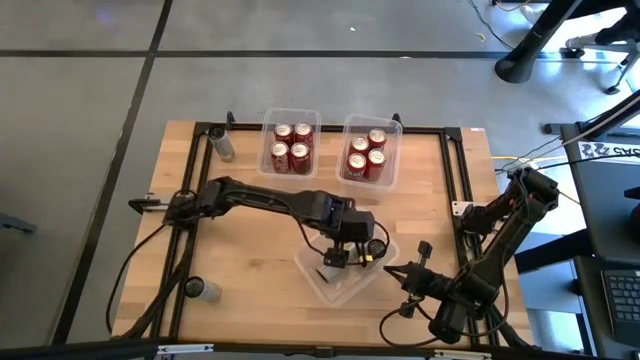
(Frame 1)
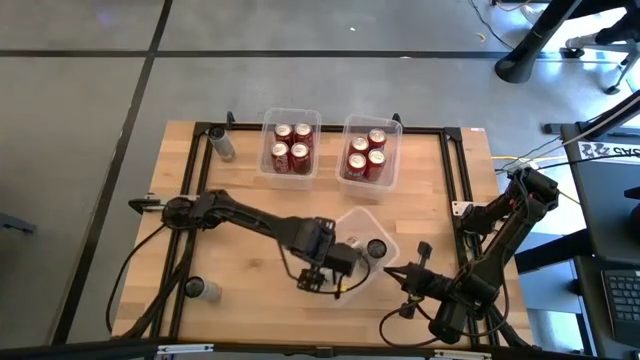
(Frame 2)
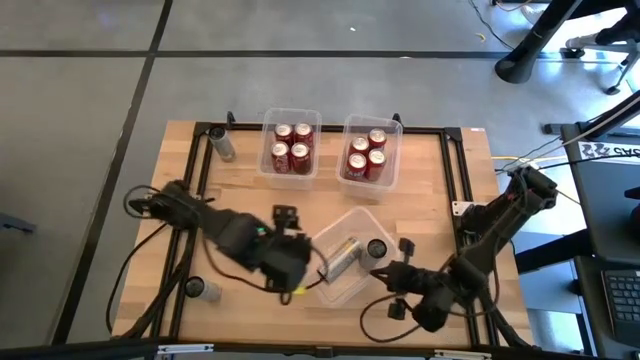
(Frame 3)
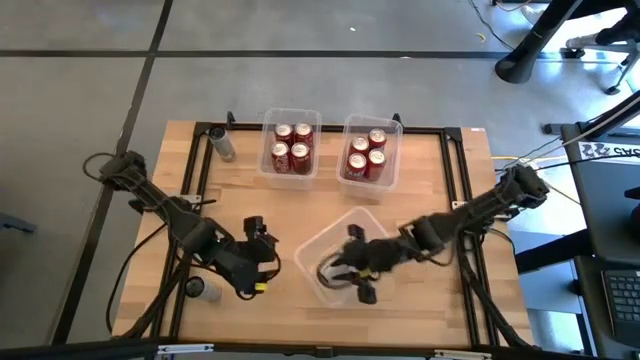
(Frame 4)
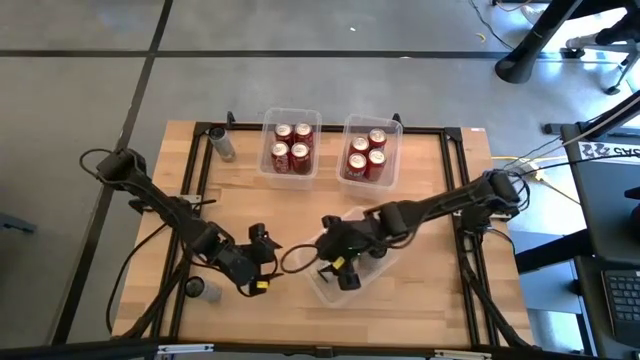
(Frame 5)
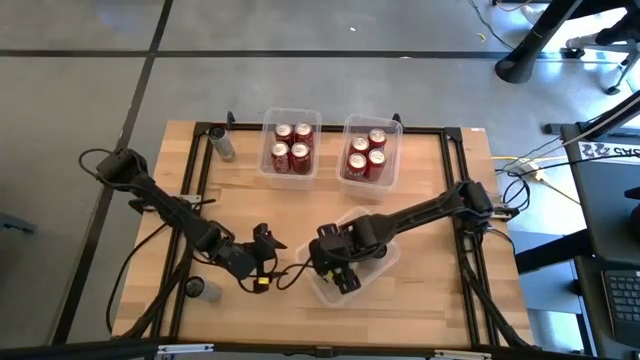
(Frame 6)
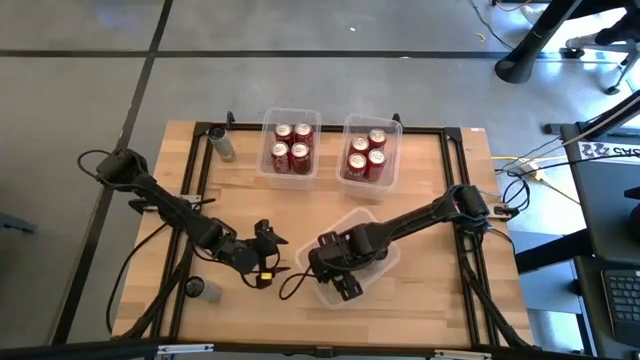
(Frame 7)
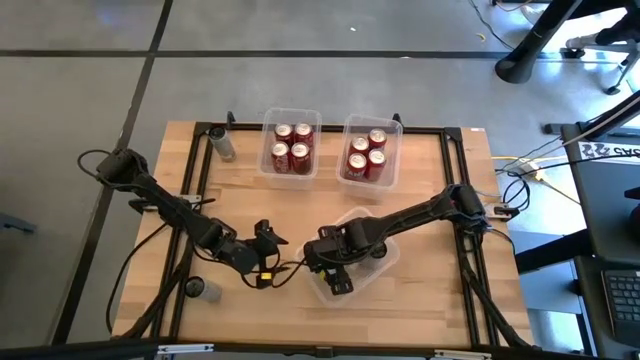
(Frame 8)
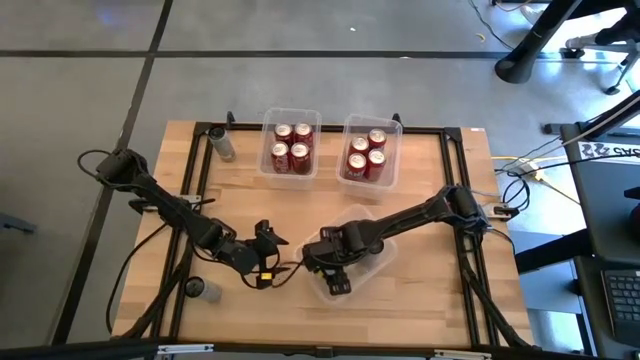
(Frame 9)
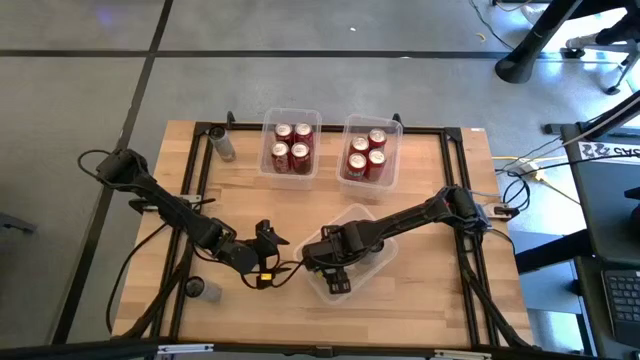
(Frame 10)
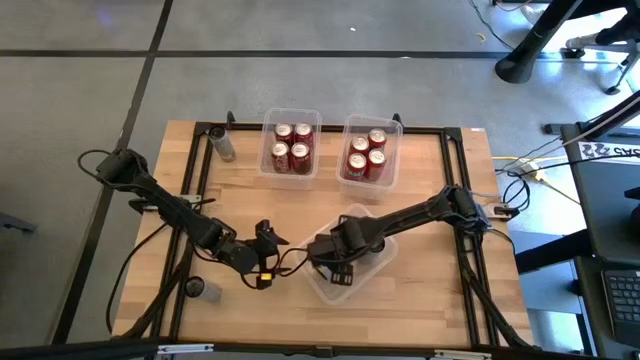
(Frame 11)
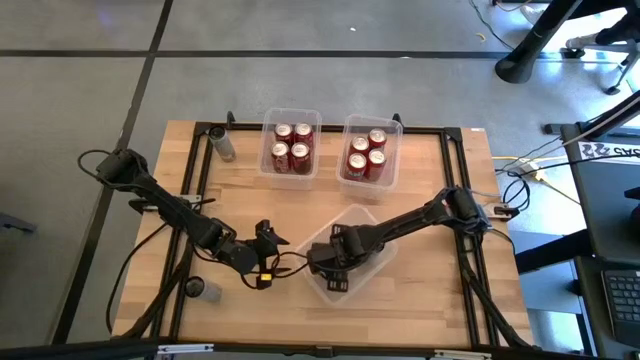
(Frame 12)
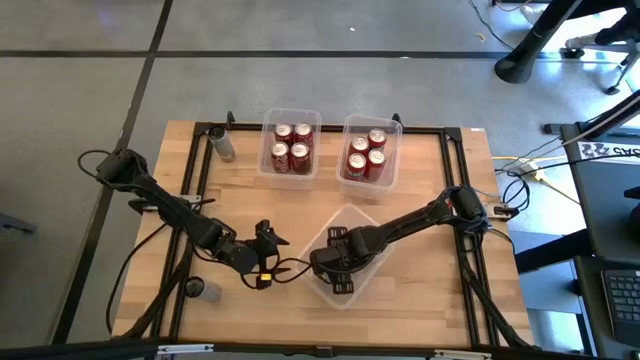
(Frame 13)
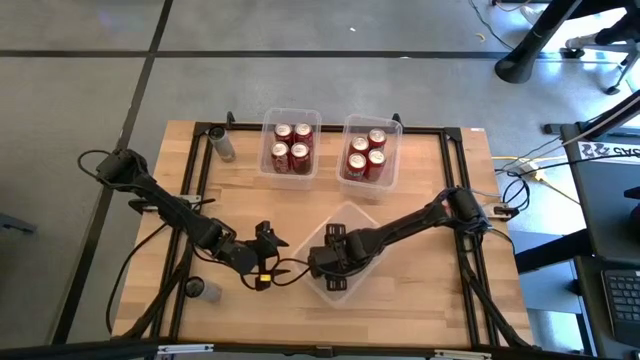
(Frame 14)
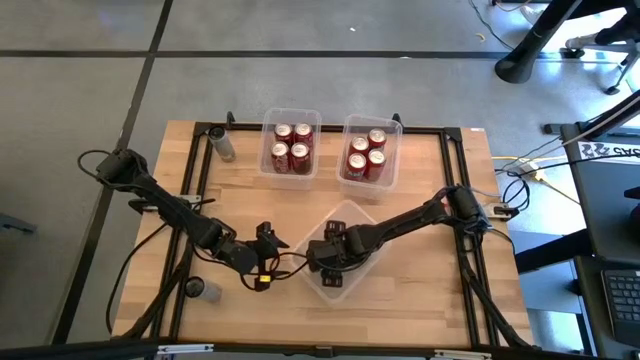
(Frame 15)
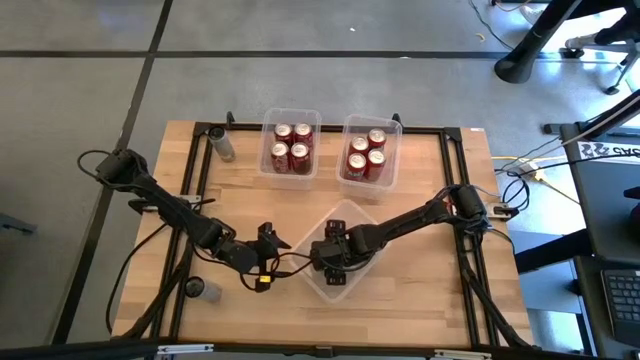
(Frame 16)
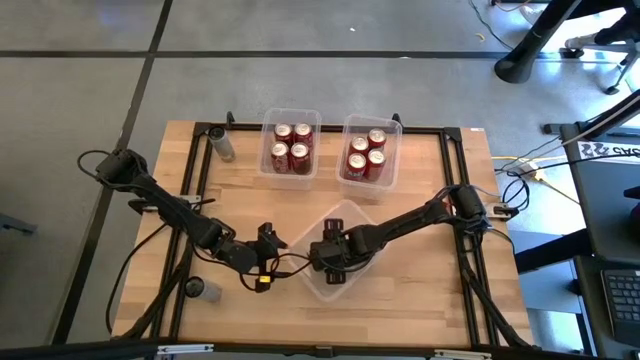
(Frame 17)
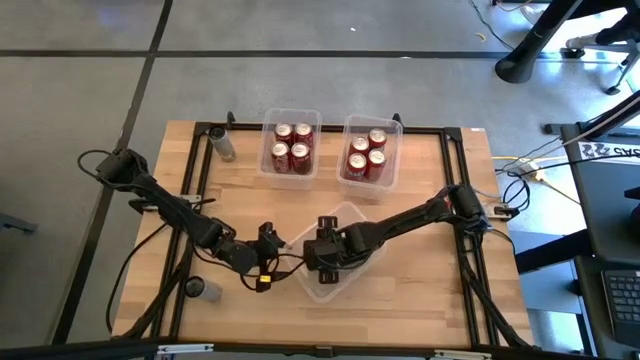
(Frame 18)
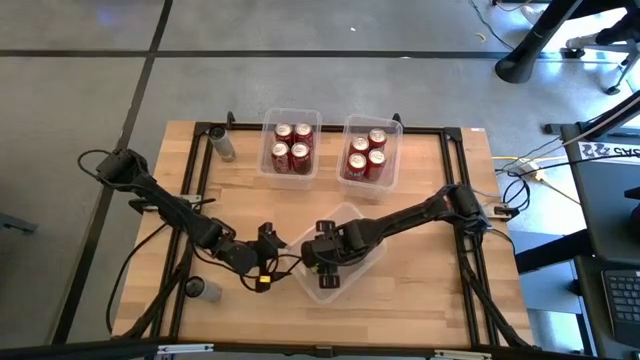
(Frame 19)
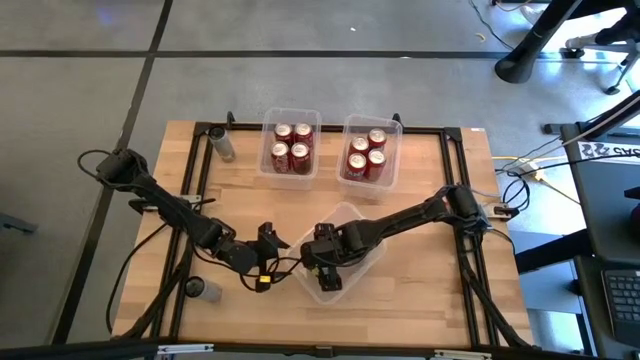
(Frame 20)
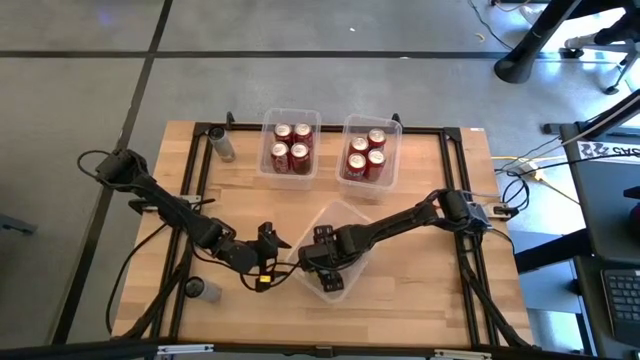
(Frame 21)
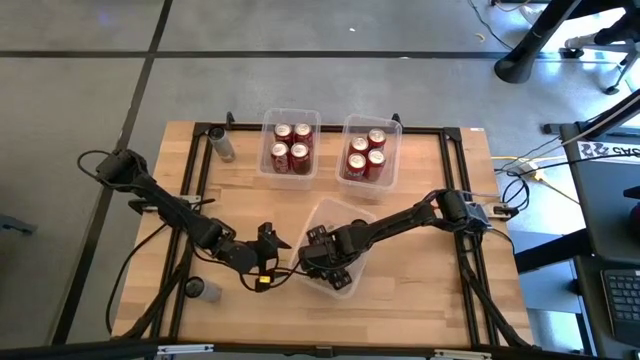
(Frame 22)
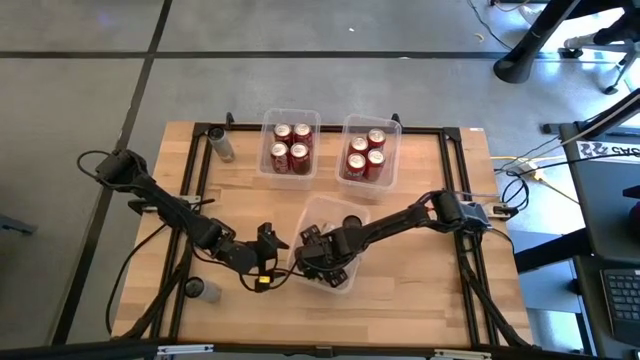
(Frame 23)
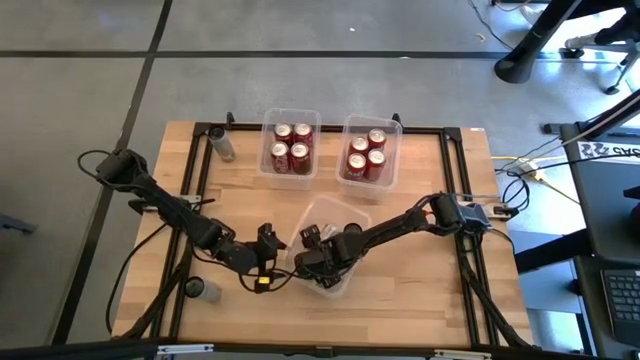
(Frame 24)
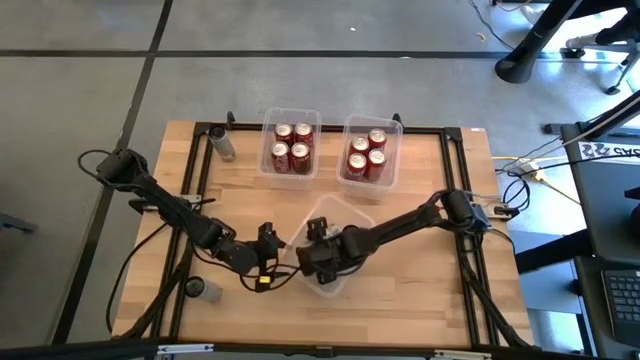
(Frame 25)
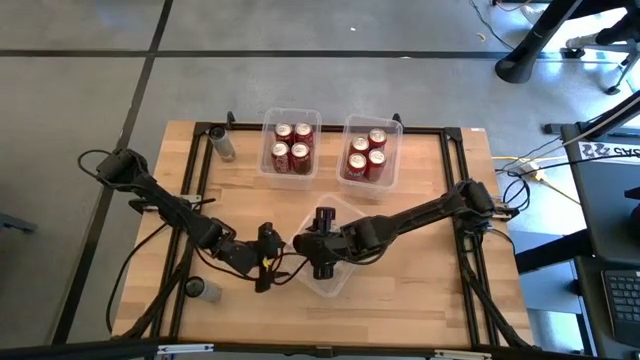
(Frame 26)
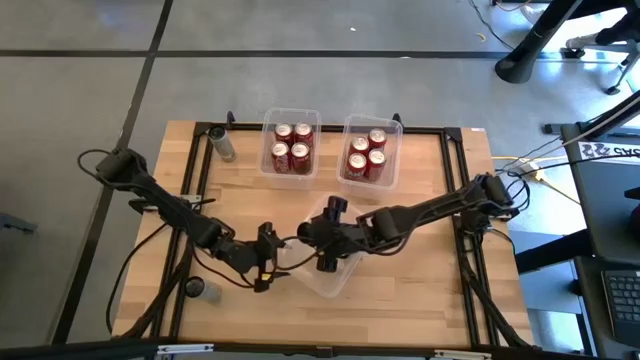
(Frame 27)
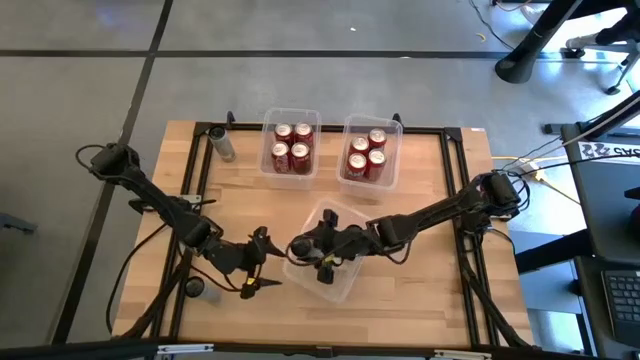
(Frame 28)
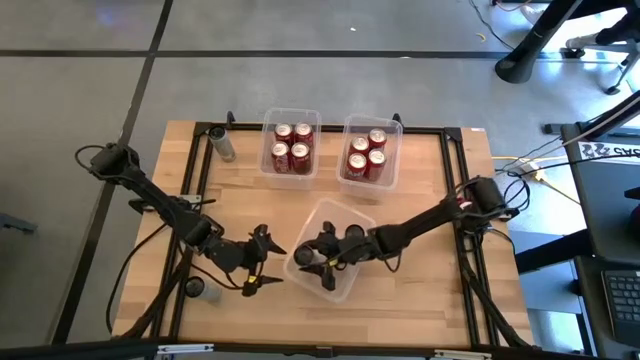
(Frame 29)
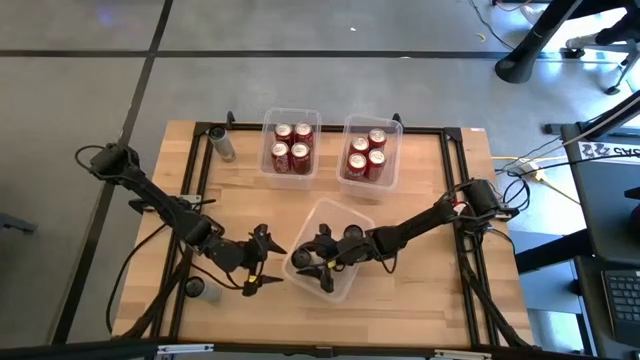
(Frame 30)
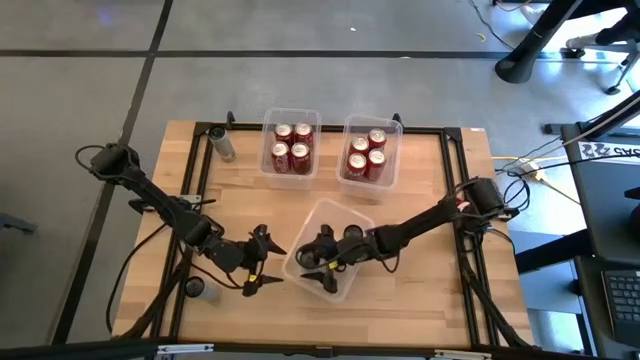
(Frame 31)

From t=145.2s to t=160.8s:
Task: Sort soda cans
Adjust the left white soda can in the bottom center transparent bin

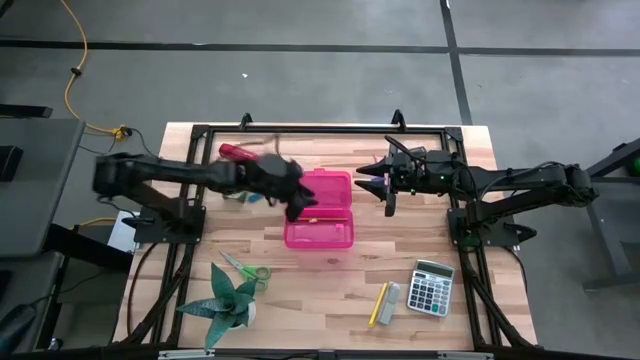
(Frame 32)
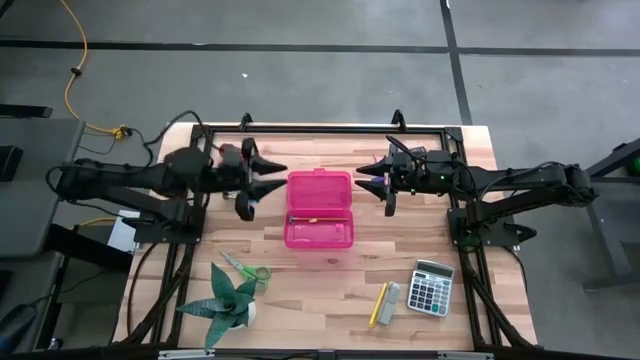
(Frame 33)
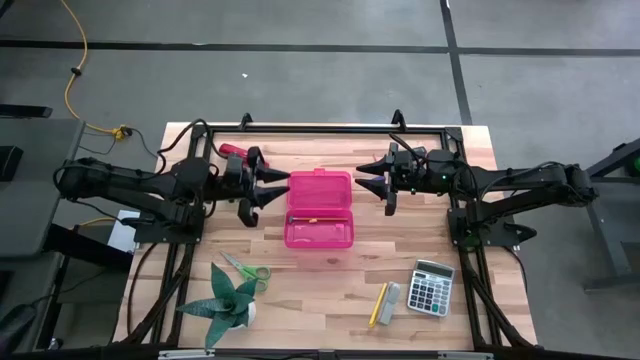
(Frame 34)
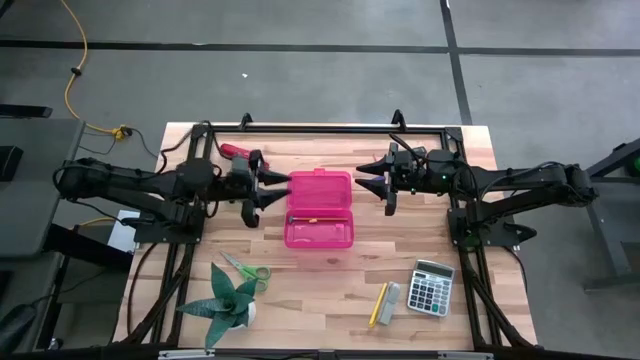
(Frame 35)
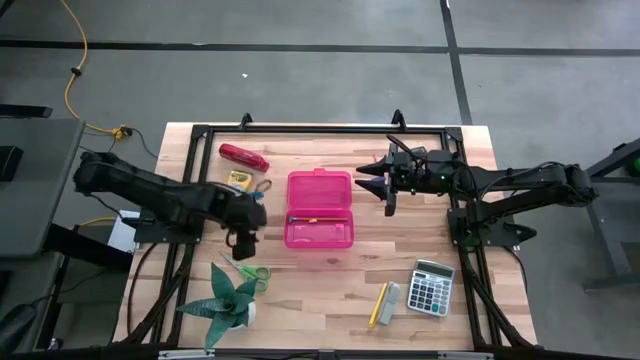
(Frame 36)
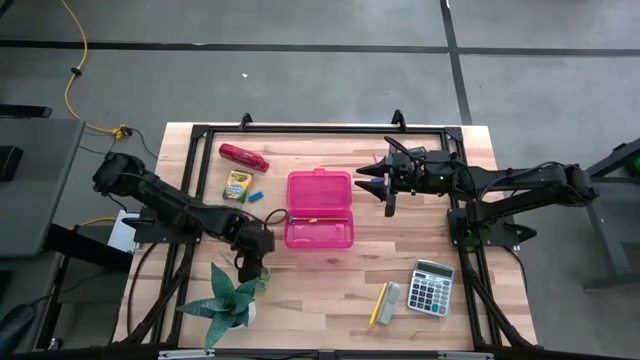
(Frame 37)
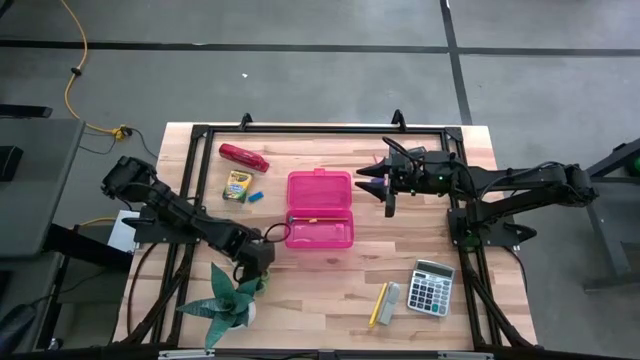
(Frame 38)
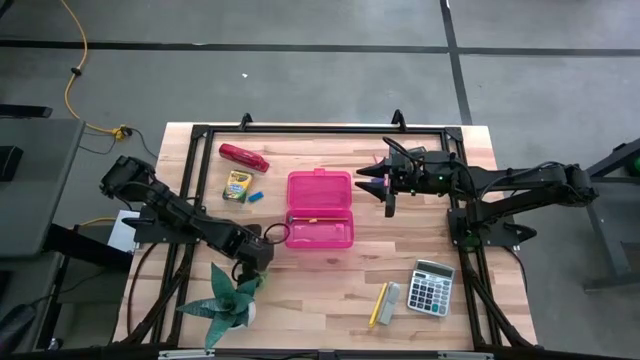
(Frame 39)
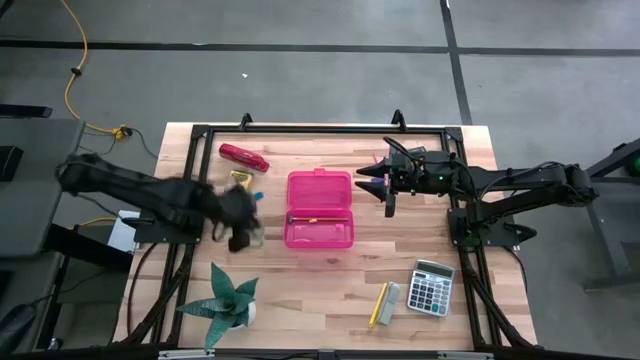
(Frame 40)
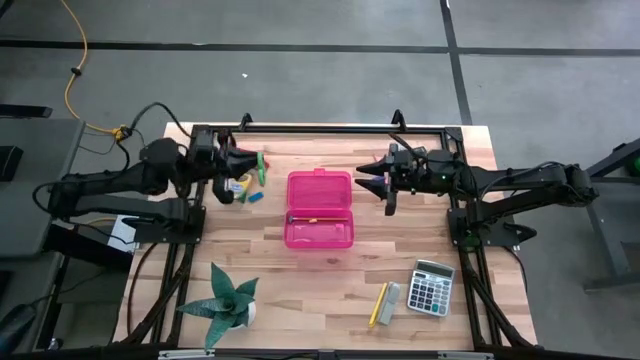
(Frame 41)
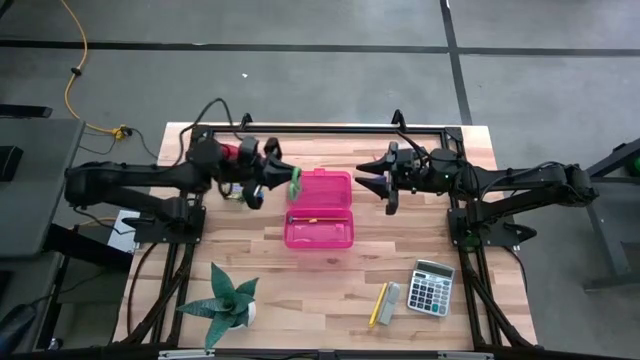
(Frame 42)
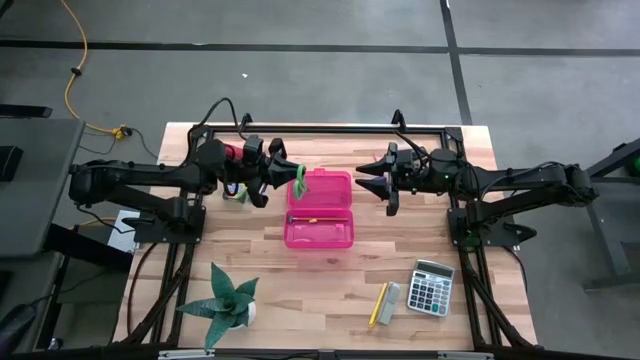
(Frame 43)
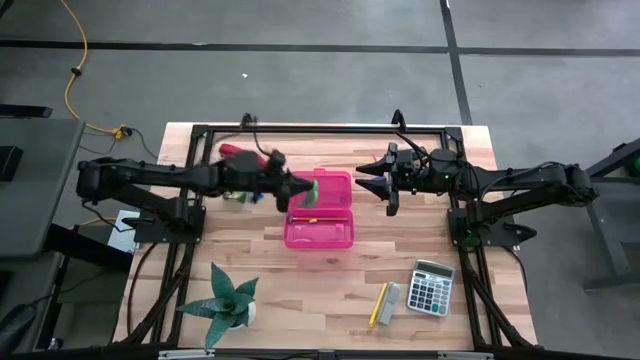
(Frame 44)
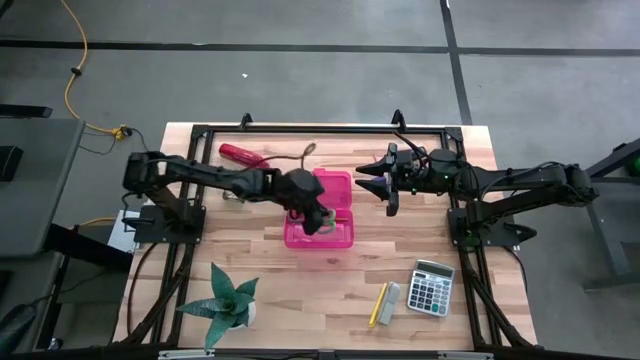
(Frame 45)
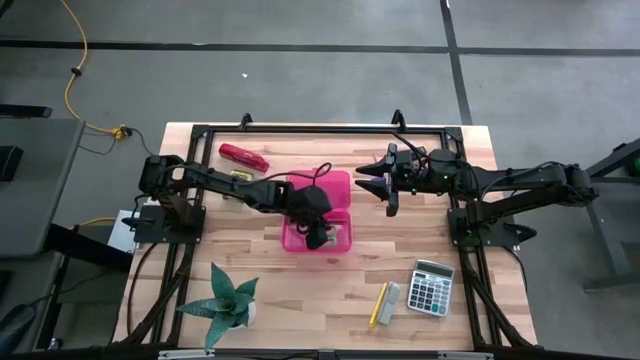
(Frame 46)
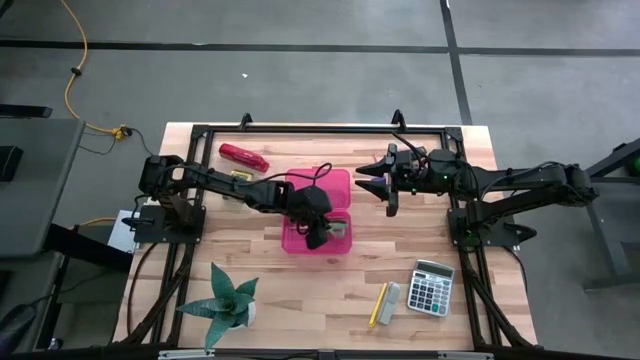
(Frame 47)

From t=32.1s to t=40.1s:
Task: Pack school essentials
Put the green scissors into the pink supply box
